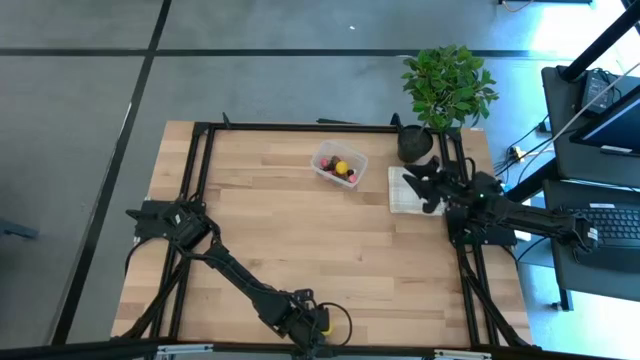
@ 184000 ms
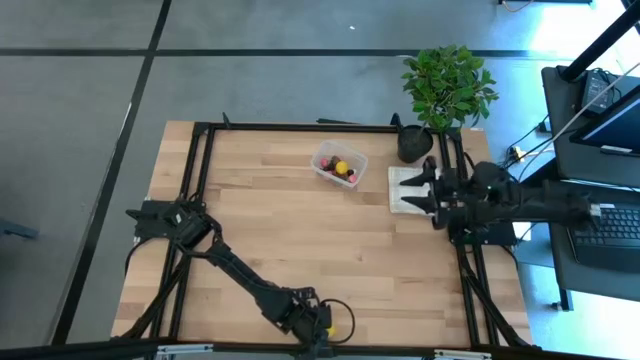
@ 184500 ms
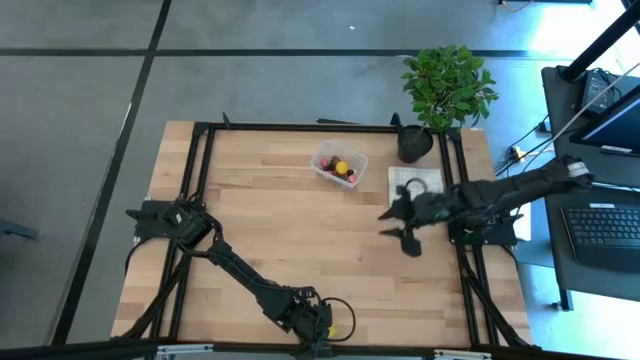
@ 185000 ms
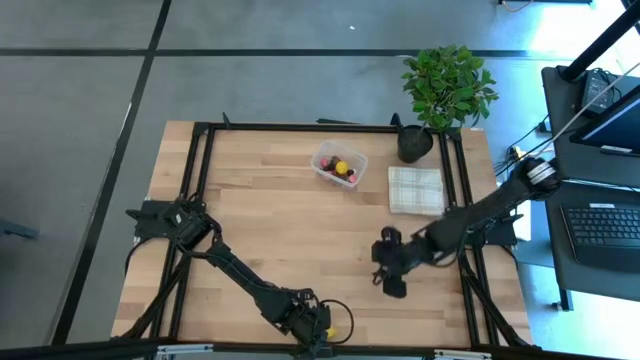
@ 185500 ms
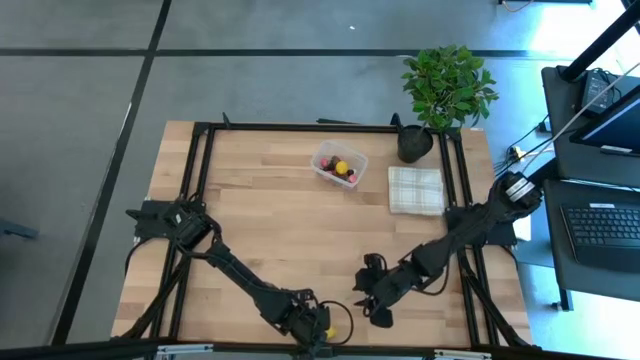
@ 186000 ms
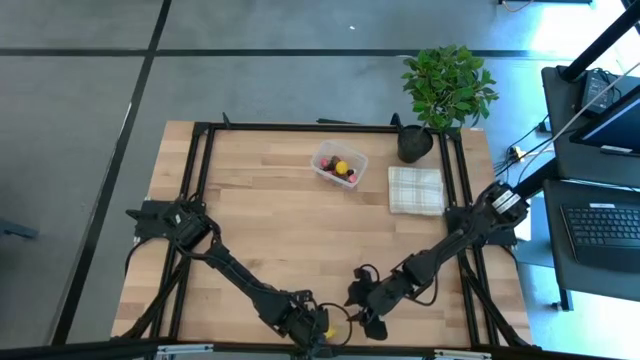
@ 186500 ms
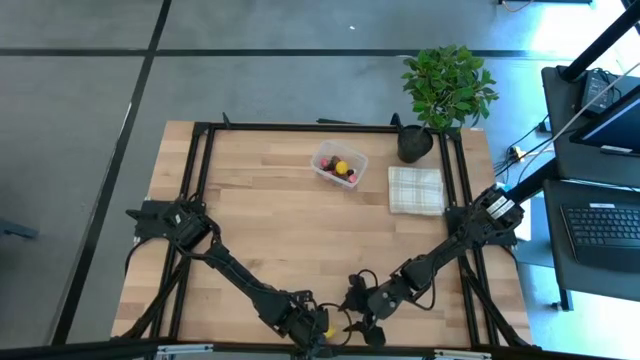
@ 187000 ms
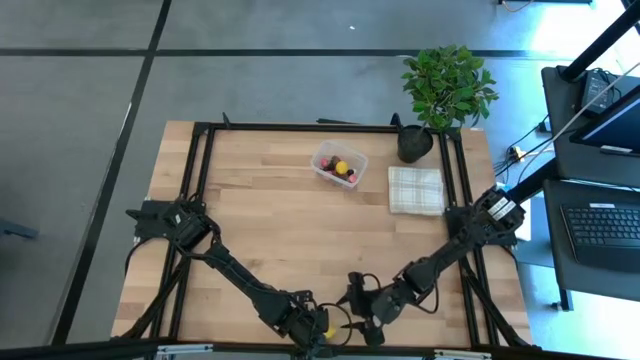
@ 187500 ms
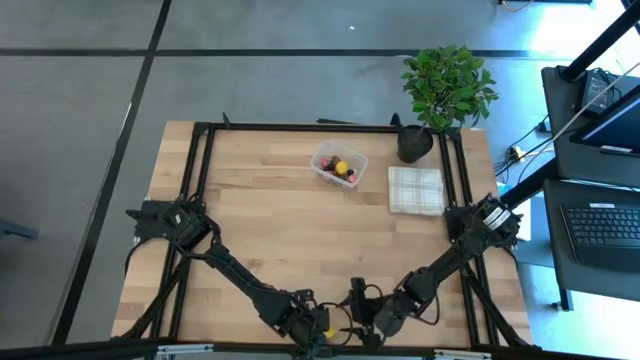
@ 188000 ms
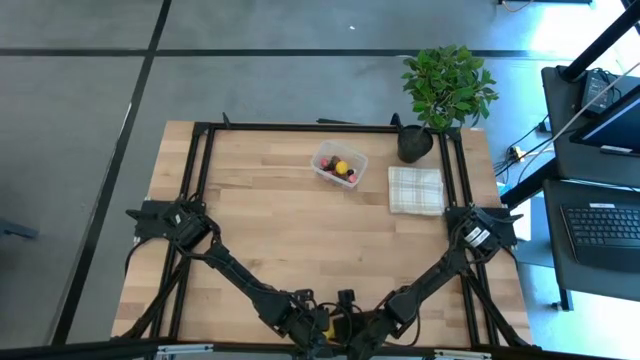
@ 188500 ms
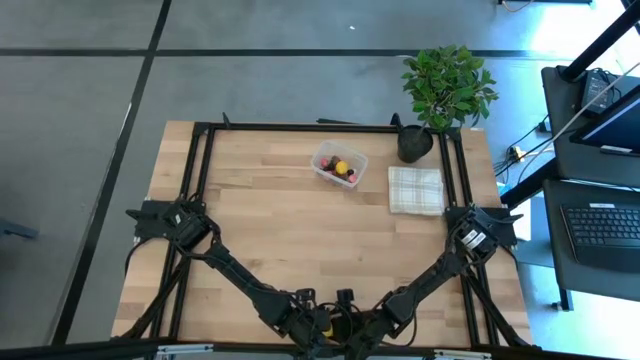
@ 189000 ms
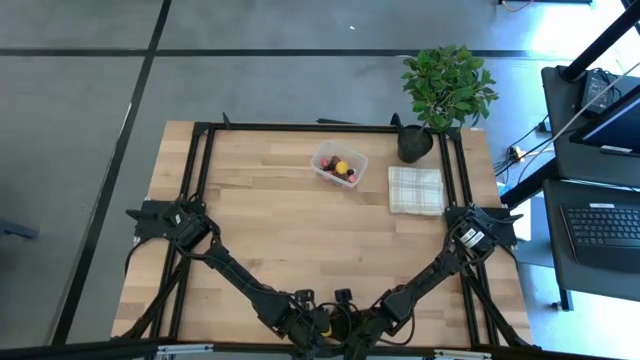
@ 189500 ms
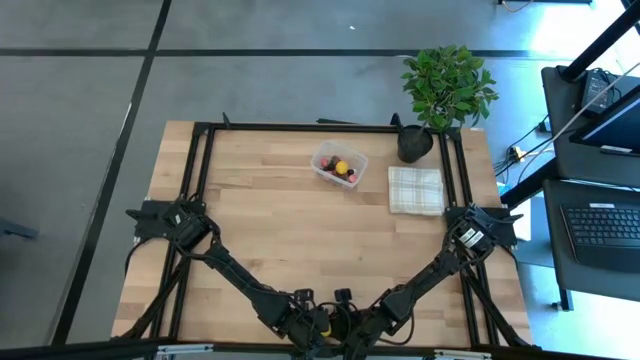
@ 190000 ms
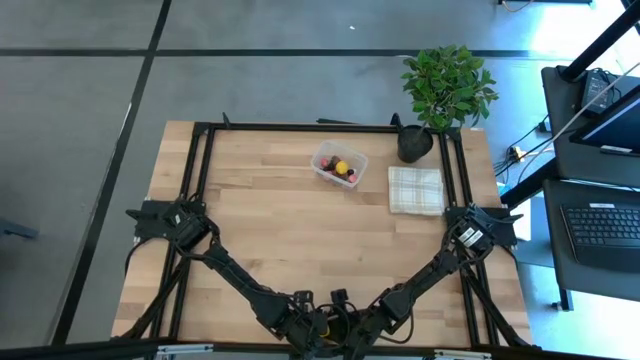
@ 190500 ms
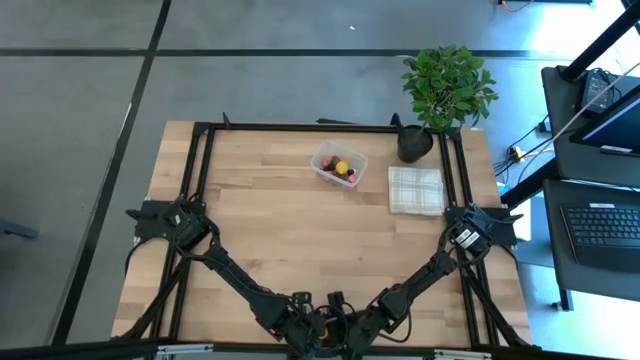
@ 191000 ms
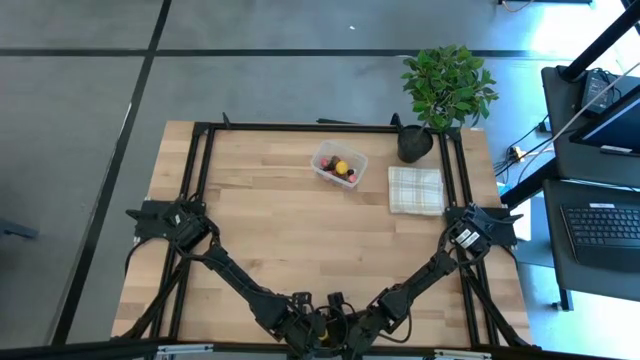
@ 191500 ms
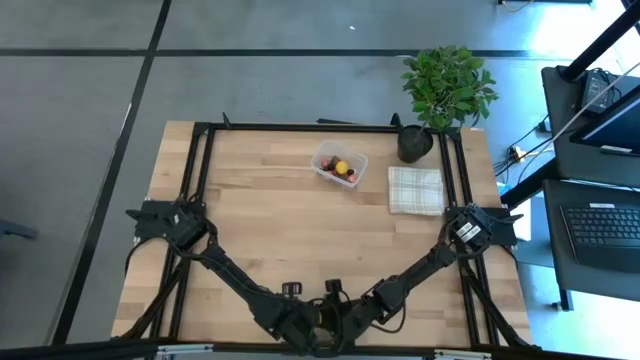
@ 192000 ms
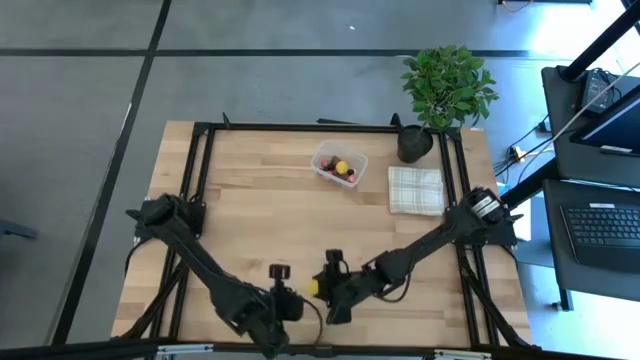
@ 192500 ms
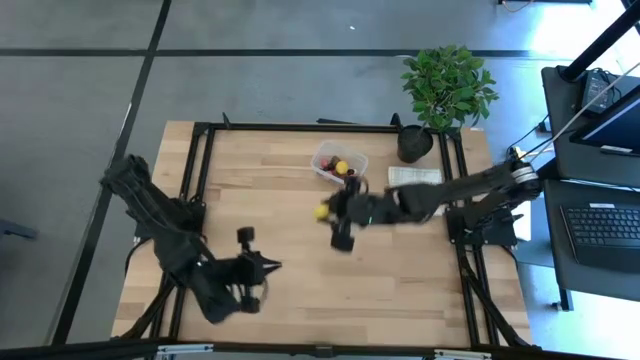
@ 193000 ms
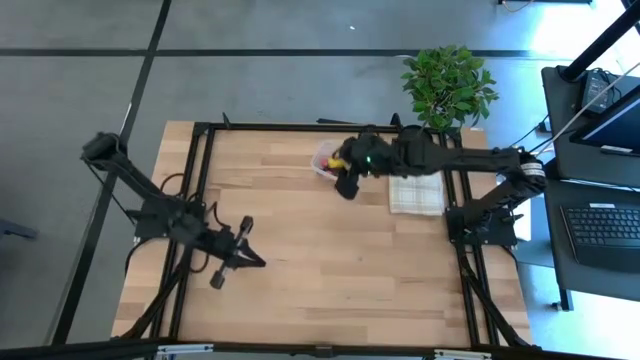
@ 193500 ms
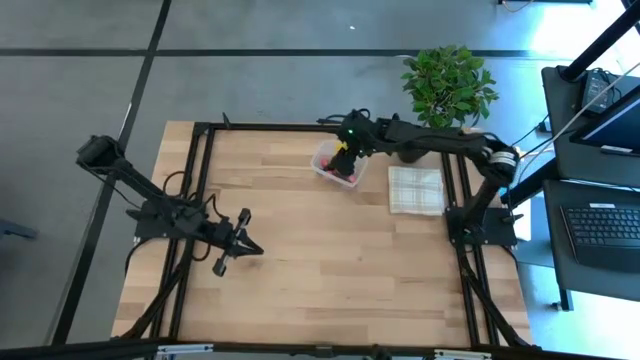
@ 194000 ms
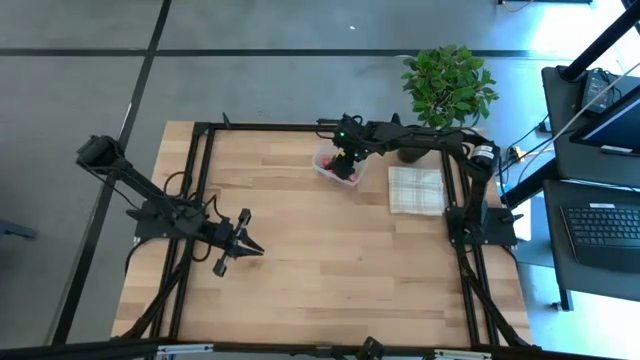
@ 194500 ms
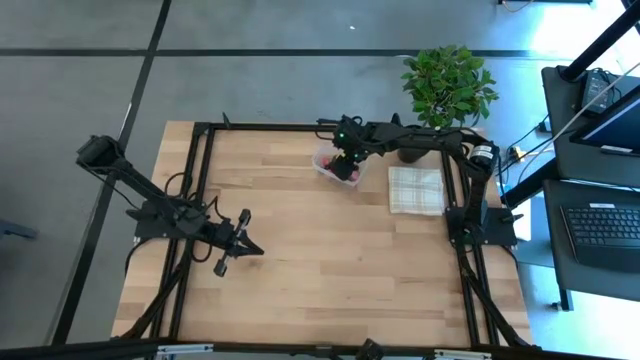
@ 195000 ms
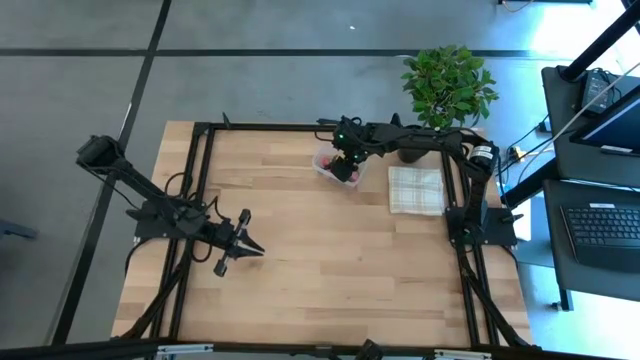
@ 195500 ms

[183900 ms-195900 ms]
Task: Pick and placing Produce into tupperware
Put the lemon into the transparent container

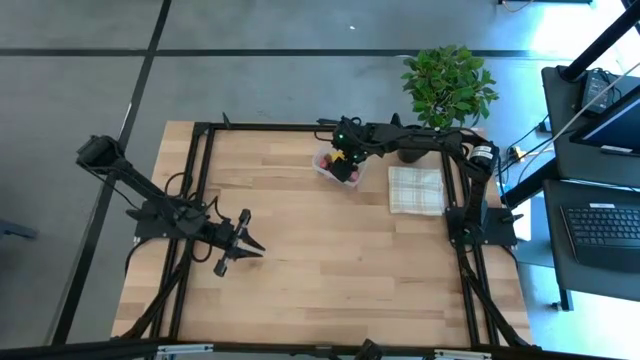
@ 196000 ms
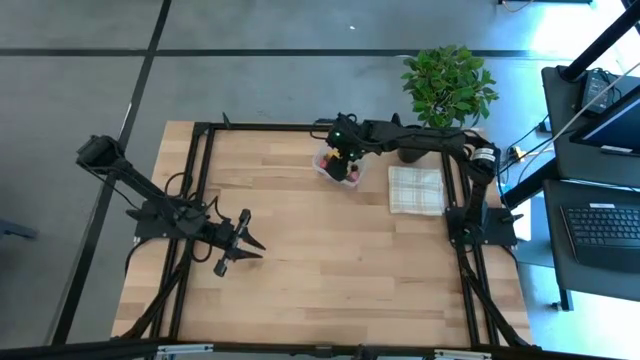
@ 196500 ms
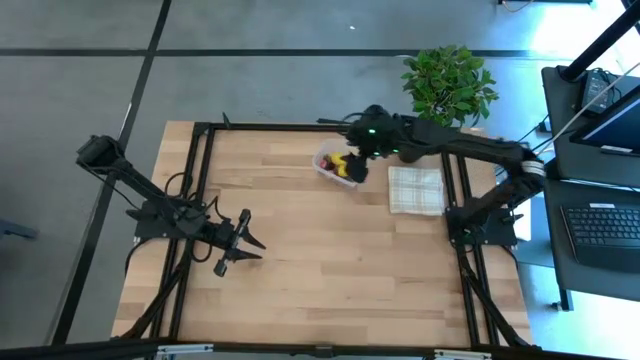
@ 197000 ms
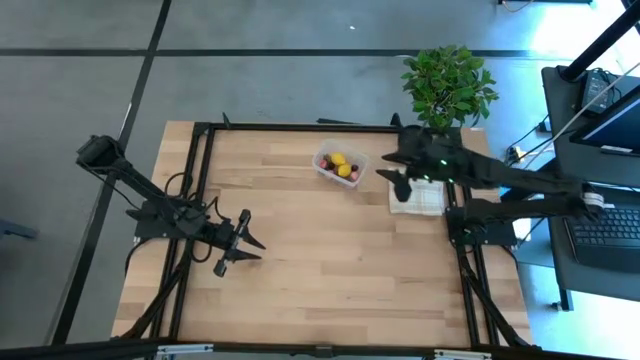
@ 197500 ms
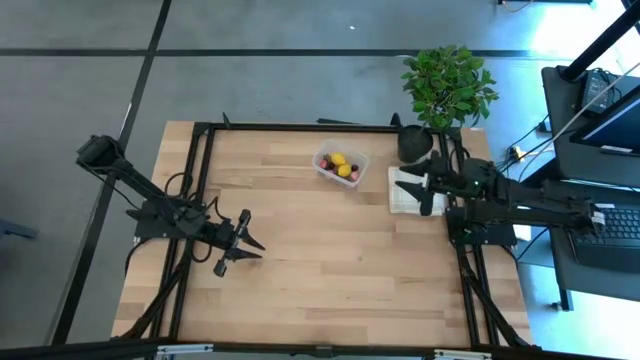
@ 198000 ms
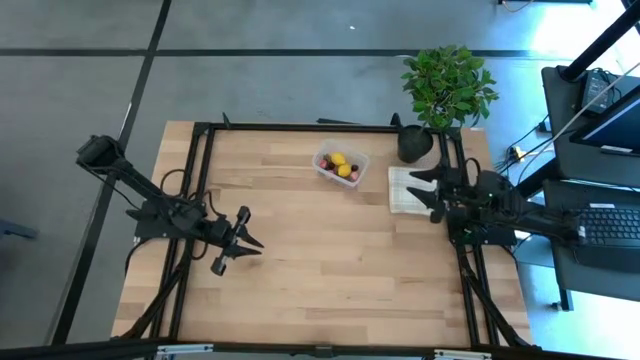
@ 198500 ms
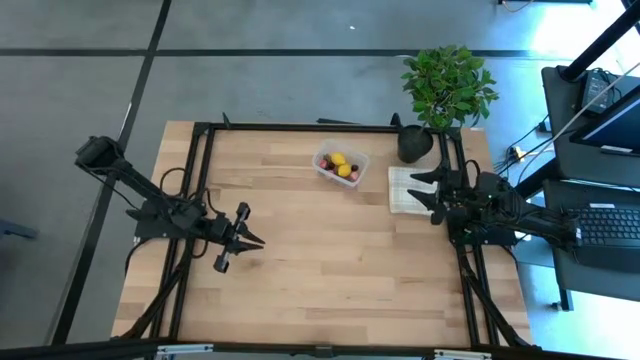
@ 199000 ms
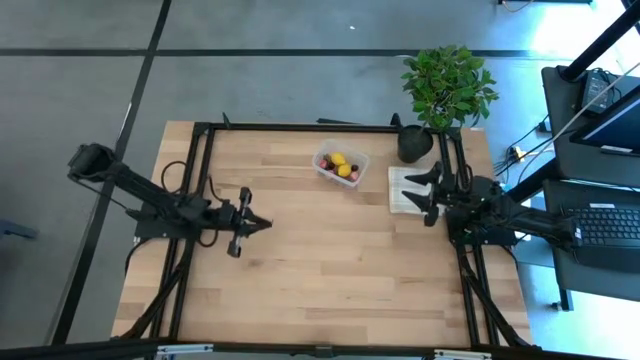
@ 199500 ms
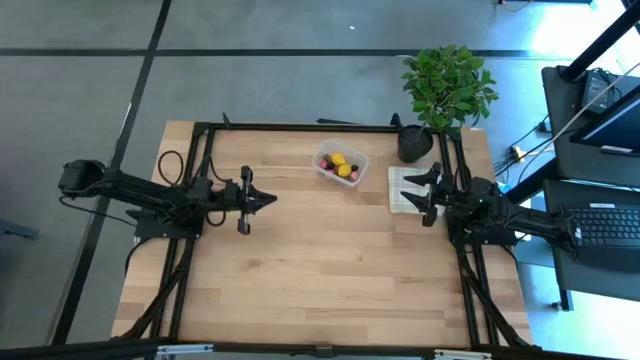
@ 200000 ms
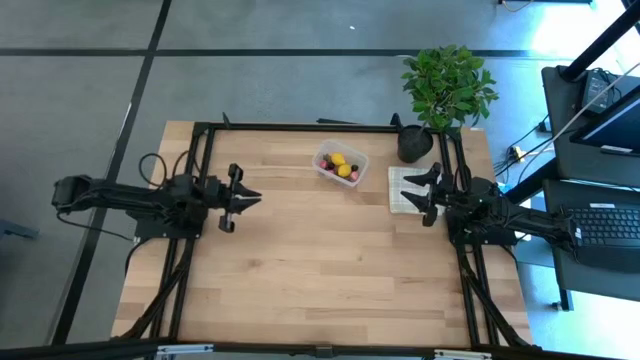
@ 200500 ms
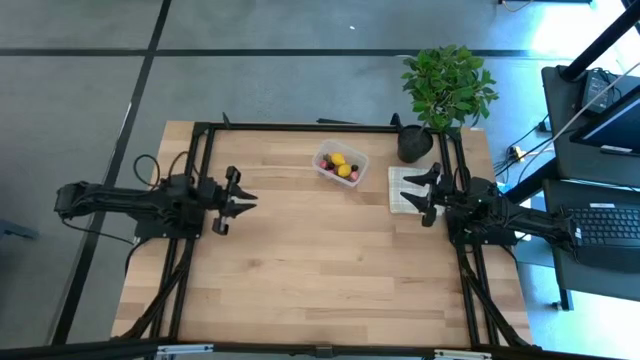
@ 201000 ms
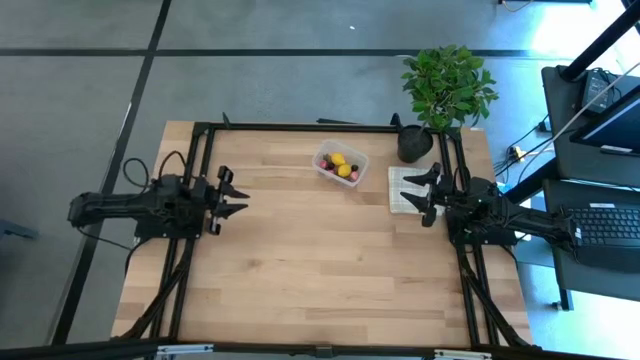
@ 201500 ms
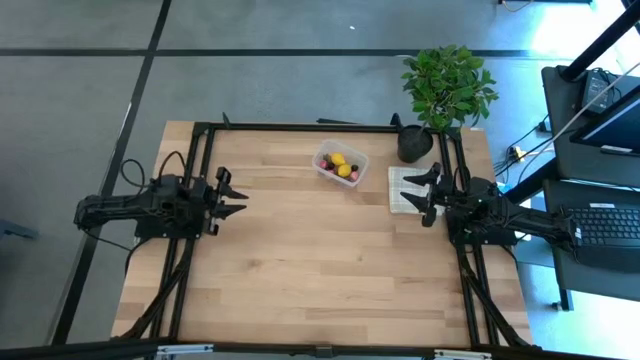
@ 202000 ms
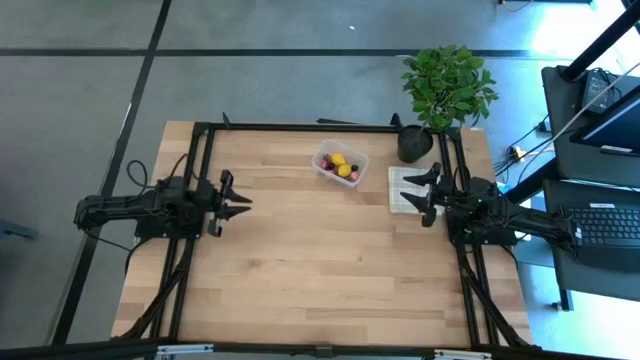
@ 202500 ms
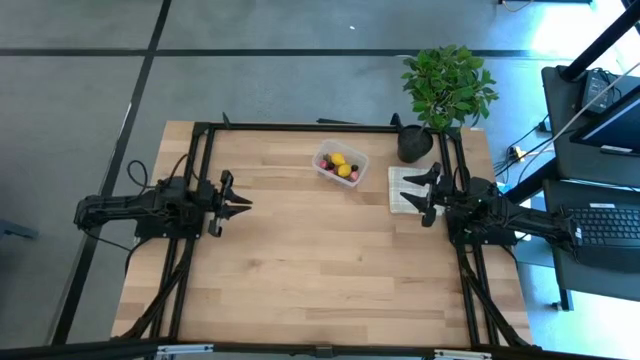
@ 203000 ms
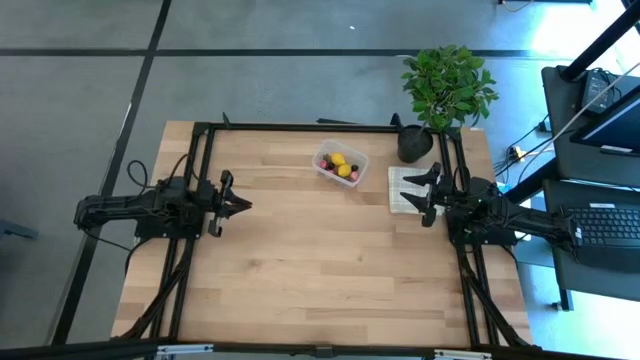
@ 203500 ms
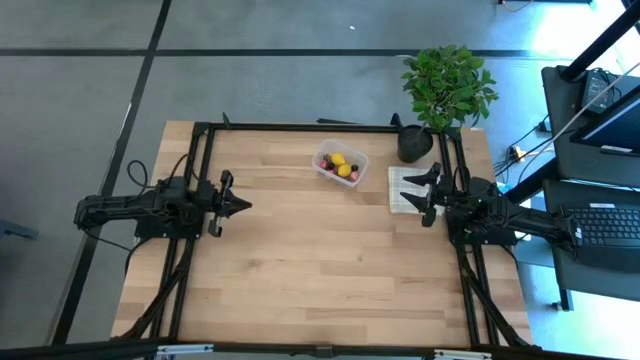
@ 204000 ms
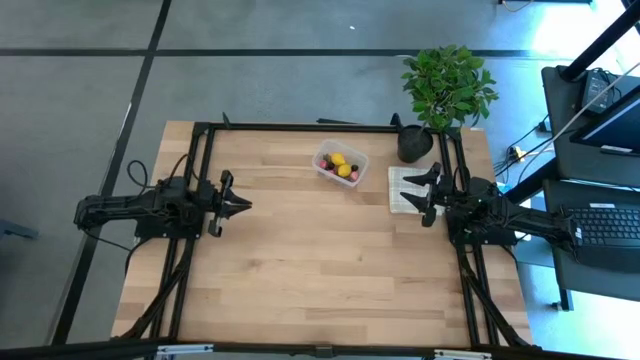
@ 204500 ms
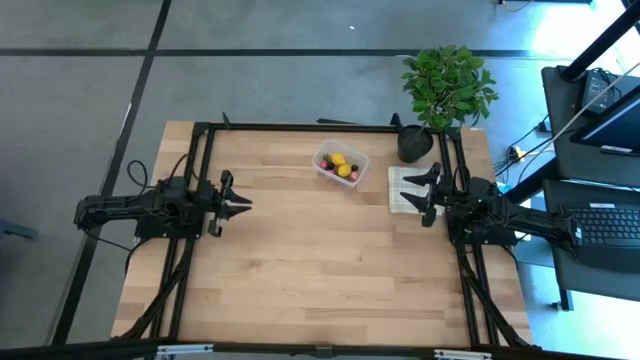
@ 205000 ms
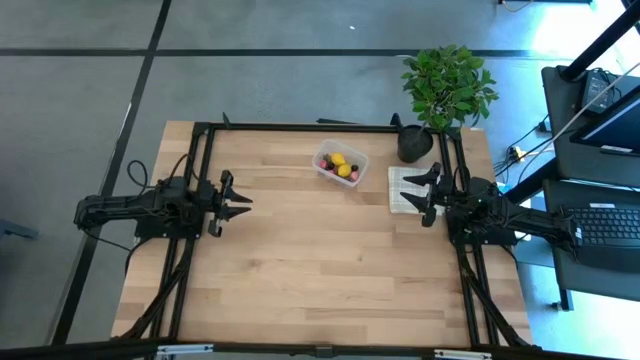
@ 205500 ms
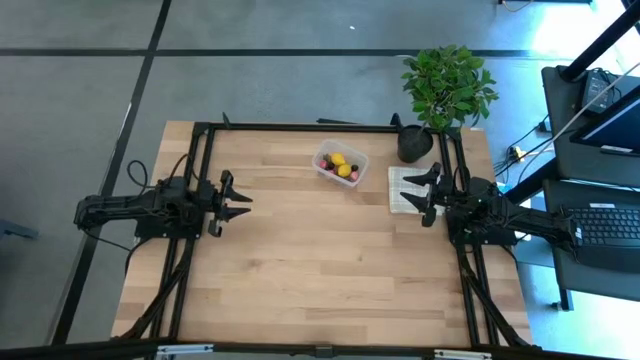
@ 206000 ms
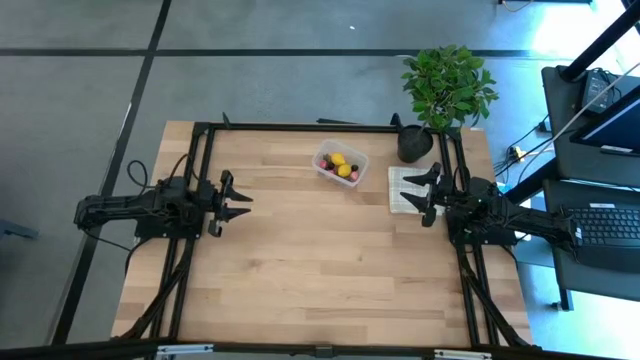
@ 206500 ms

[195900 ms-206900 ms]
Return to Home Position
